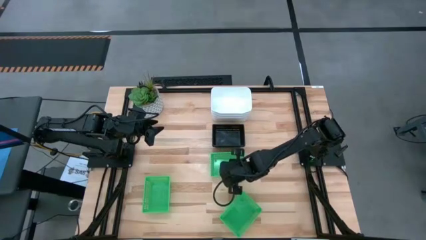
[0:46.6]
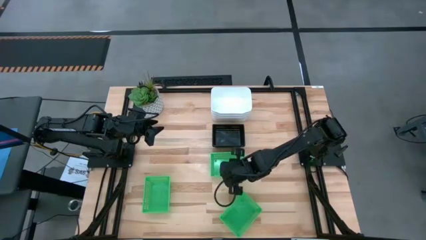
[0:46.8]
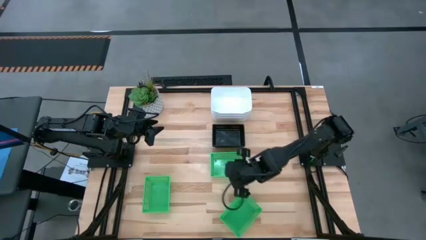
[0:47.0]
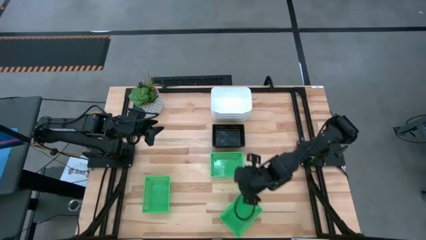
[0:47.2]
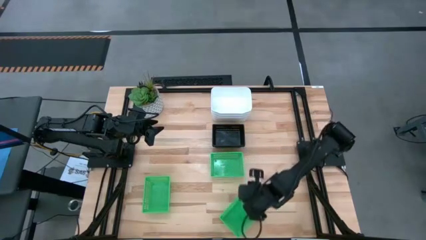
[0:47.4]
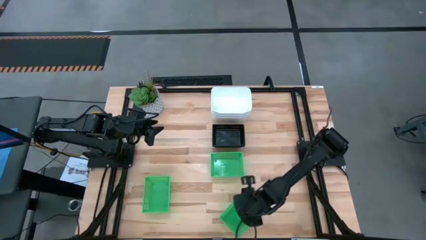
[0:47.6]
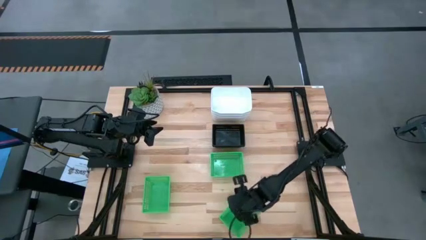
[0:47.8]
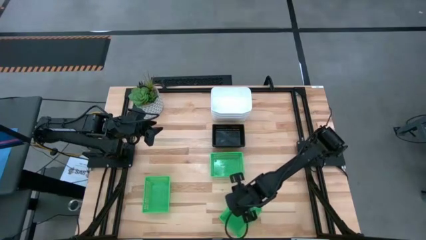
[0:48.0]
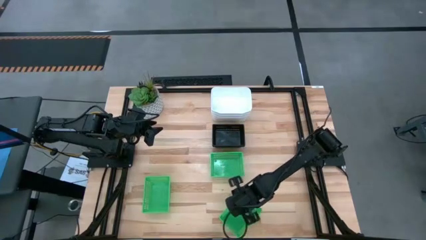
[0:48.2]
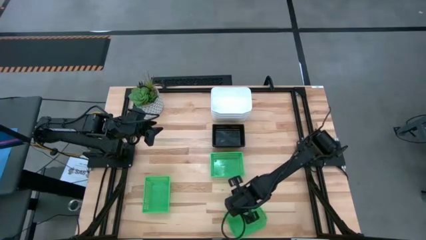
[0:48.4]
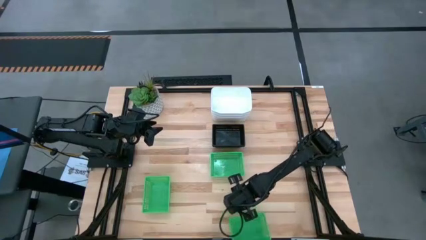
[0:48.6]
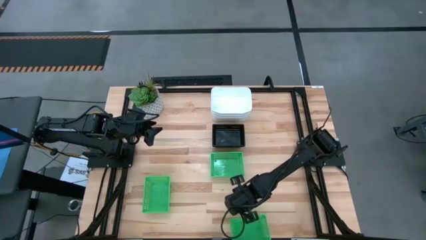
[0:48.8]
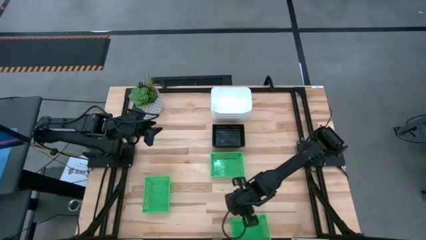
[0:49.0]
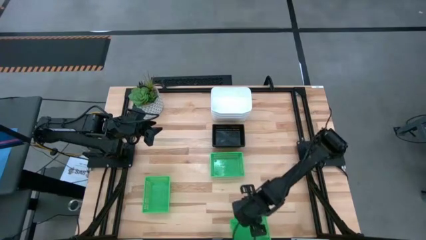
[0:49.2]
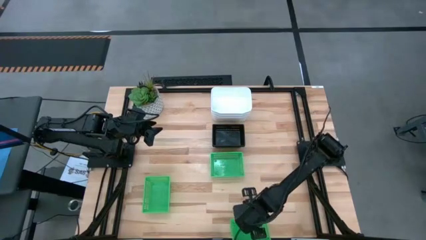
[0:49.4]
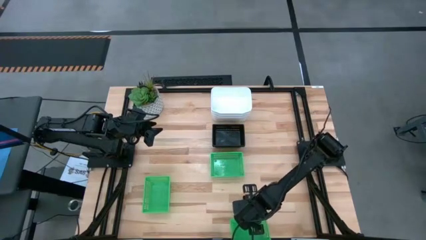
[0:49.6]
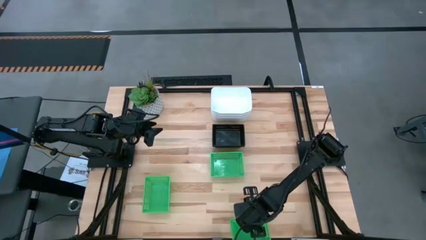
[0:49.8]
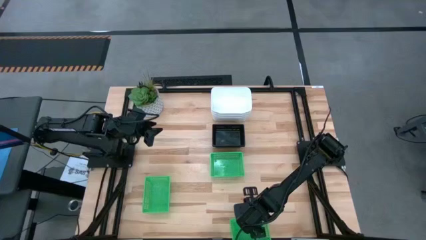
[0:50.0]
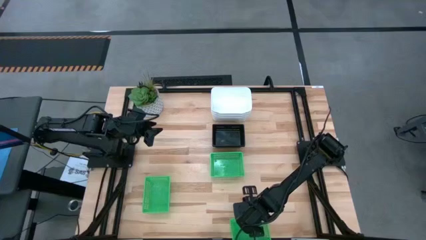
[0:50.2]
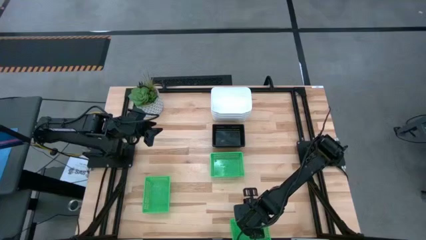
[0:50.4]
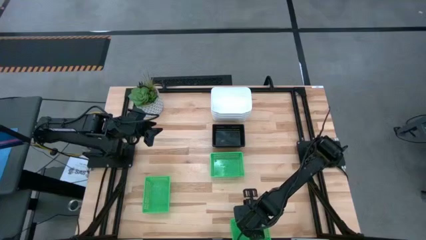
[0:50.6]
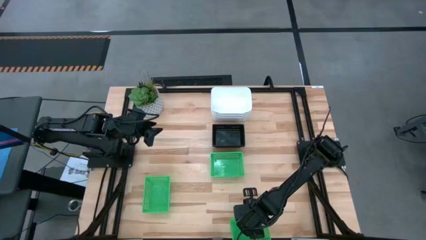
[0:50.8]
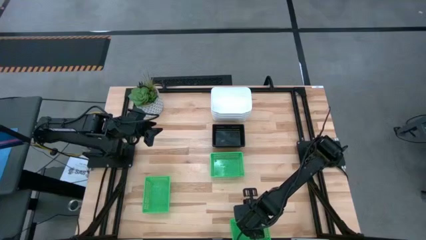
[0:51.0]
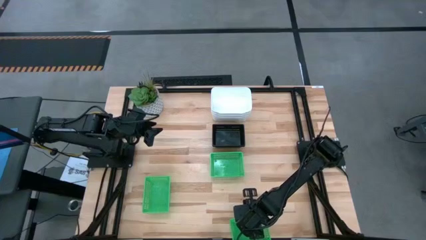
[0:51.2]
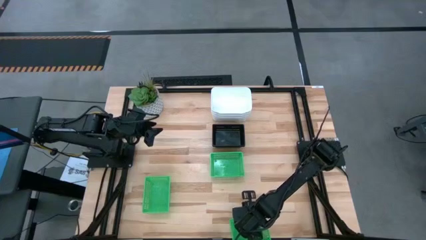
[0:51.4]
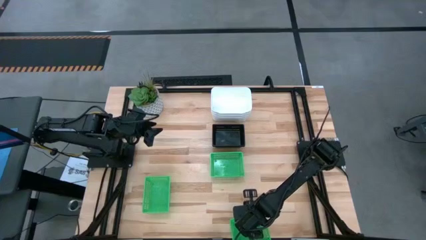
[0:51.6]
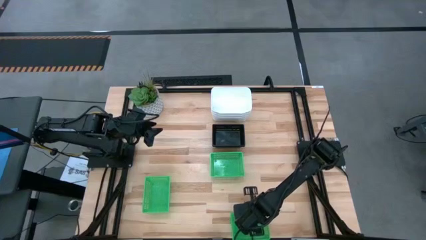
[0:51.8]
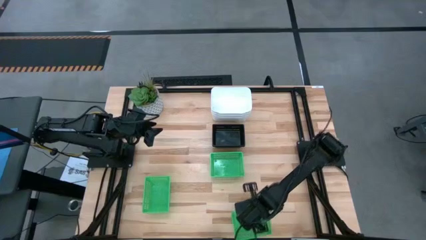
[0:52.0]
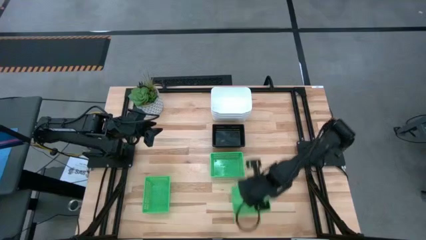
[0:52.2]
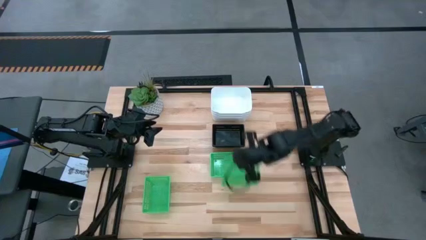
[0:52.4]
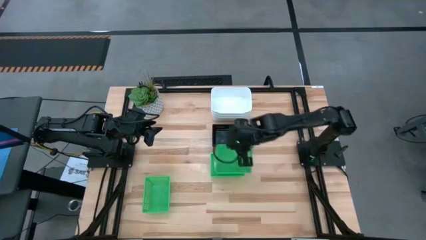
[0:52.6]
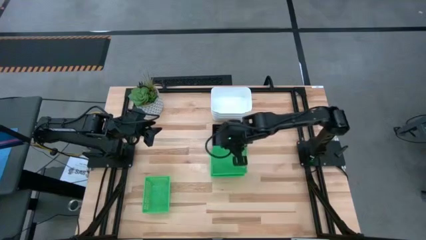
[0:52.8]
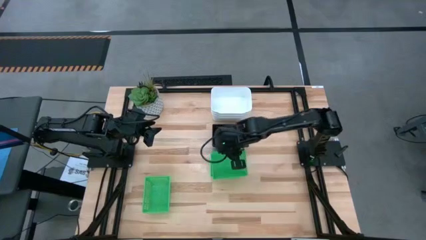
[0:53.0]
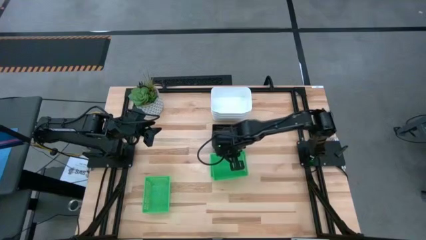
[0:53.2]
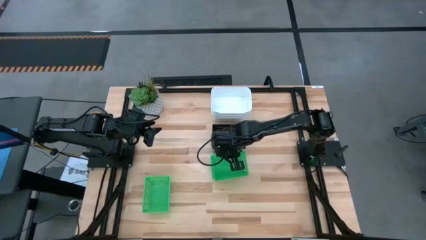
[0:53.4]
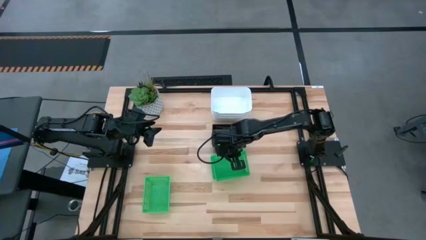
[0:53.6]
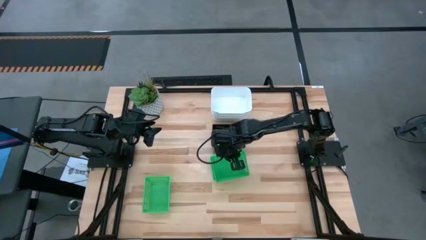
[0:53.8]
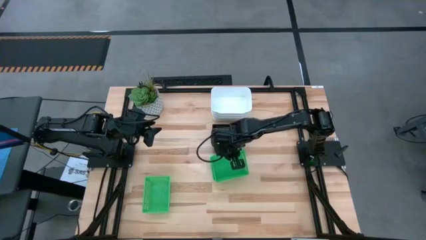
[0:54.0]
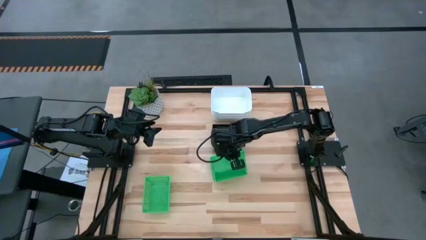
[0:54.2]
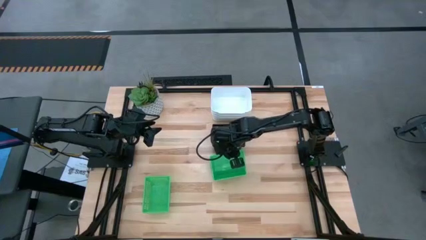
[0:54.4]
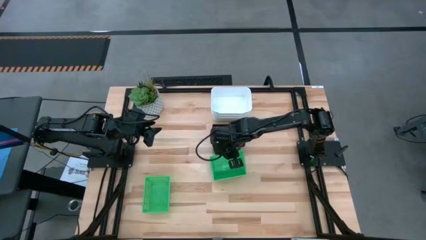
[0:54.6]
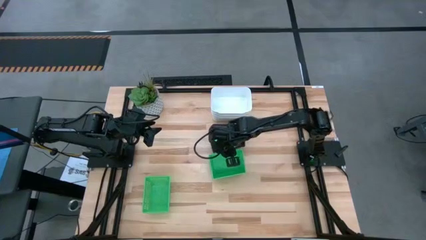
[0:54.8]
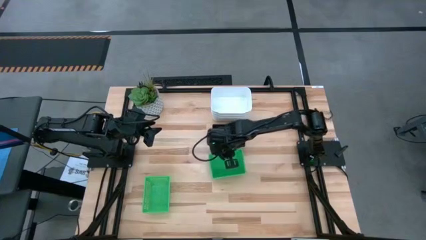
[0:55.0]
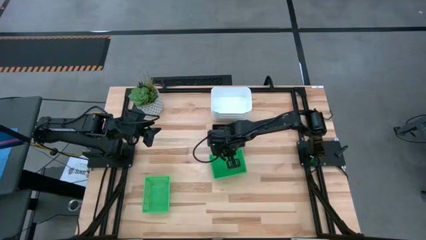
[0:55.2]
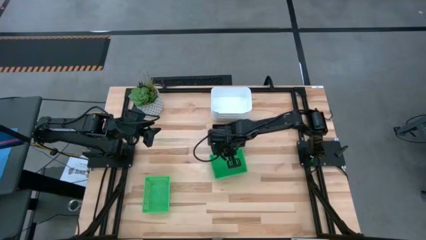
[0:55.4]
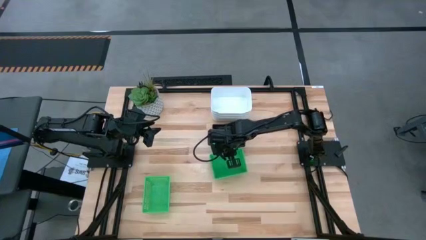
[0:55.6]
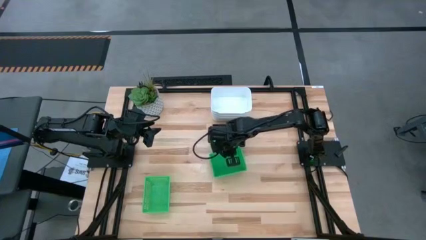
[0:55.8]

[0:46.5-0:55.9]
Stack the bottom green bin on the top green bin

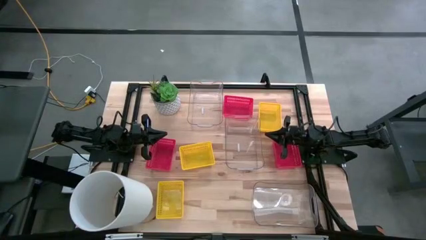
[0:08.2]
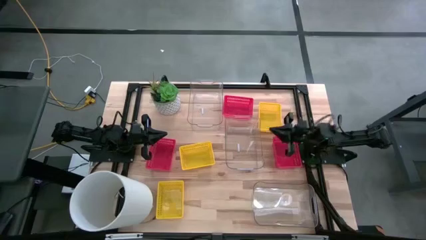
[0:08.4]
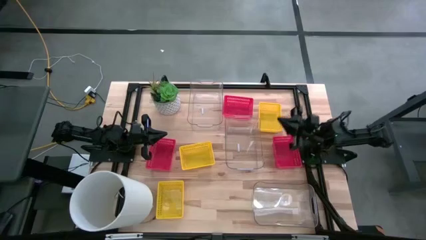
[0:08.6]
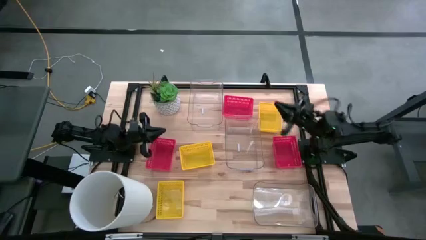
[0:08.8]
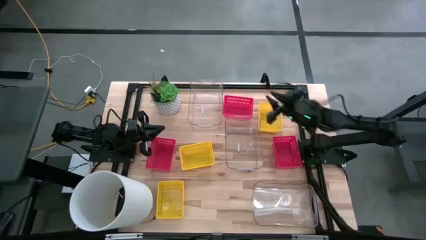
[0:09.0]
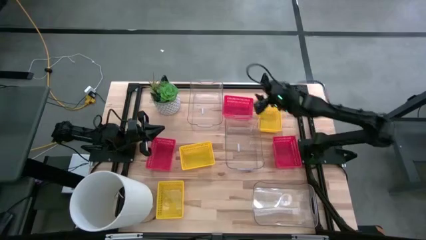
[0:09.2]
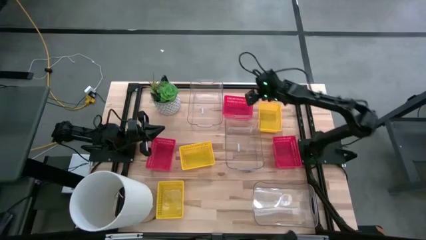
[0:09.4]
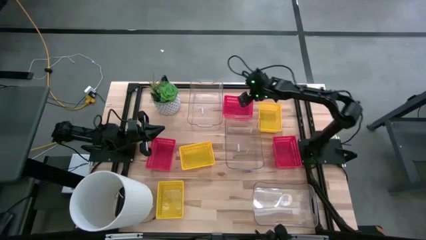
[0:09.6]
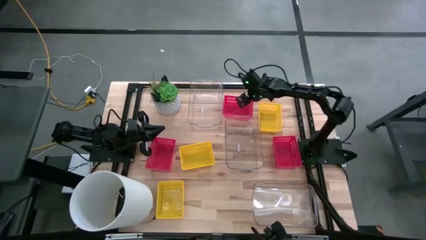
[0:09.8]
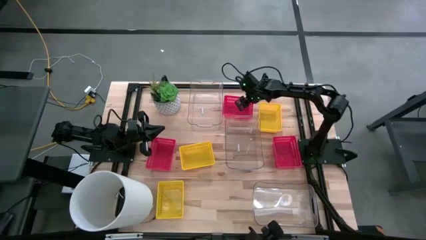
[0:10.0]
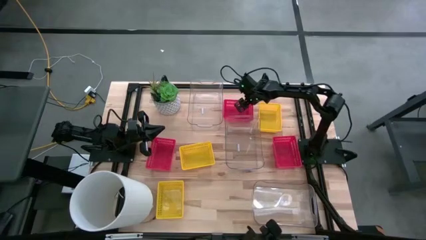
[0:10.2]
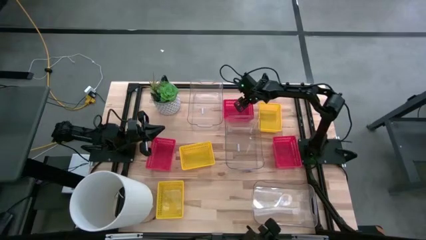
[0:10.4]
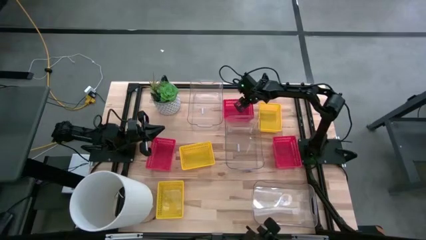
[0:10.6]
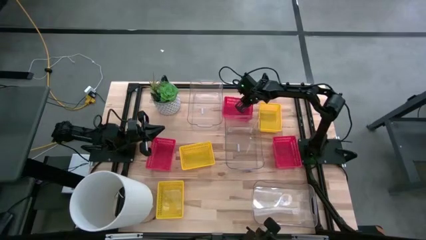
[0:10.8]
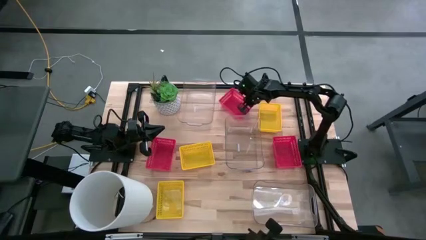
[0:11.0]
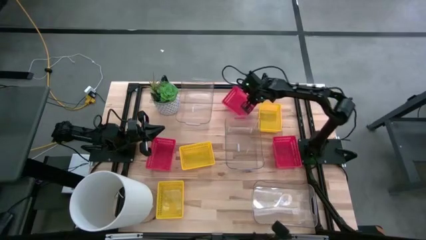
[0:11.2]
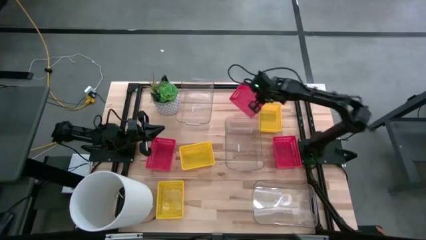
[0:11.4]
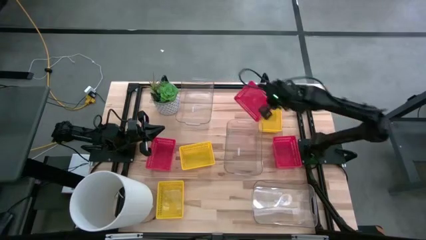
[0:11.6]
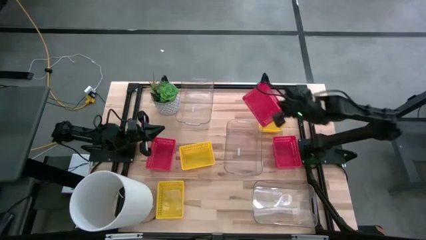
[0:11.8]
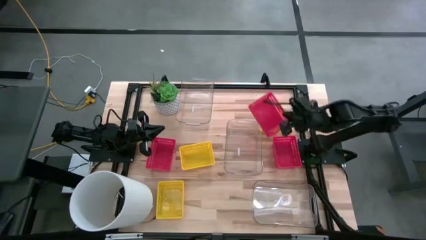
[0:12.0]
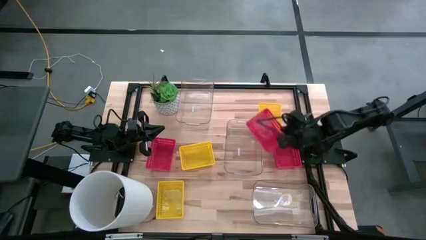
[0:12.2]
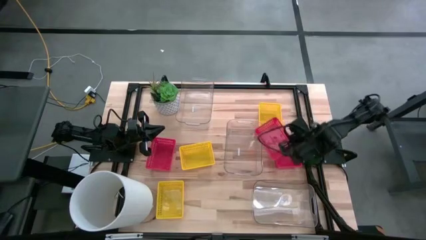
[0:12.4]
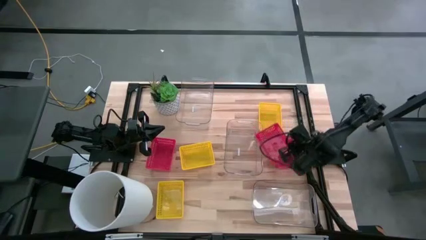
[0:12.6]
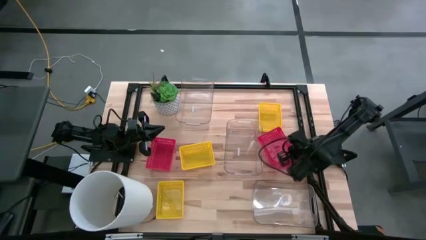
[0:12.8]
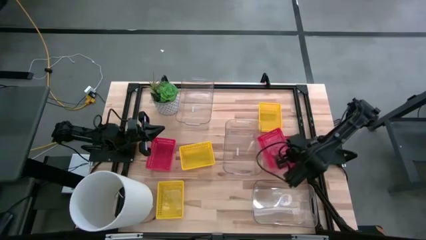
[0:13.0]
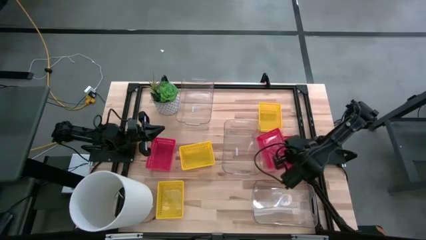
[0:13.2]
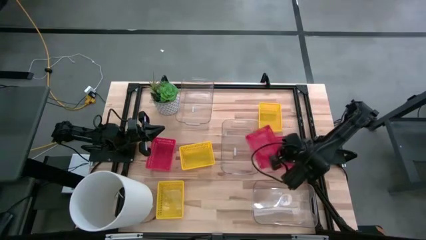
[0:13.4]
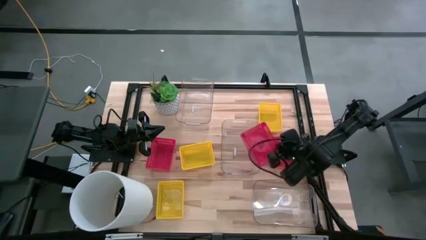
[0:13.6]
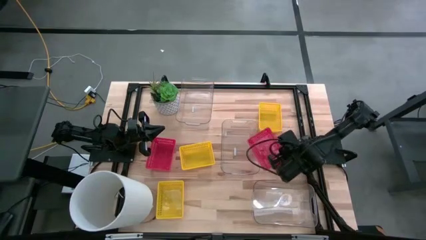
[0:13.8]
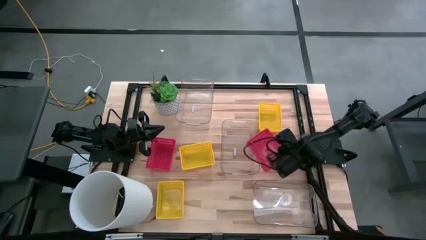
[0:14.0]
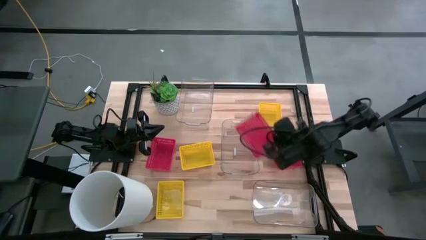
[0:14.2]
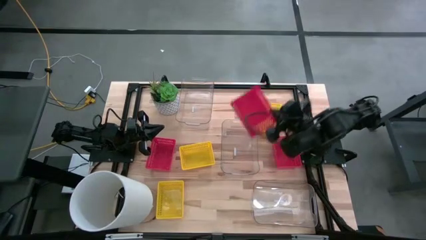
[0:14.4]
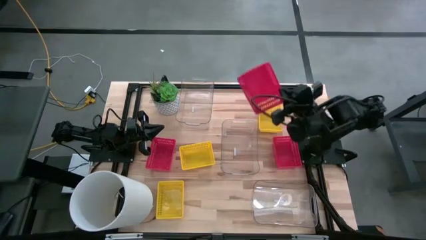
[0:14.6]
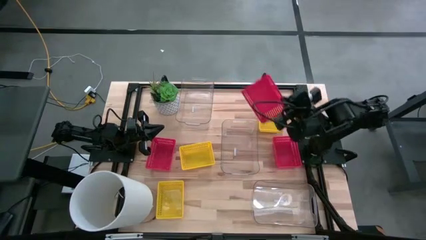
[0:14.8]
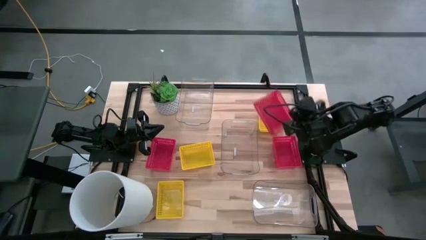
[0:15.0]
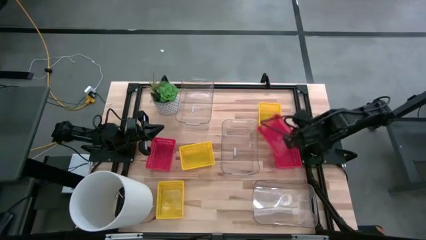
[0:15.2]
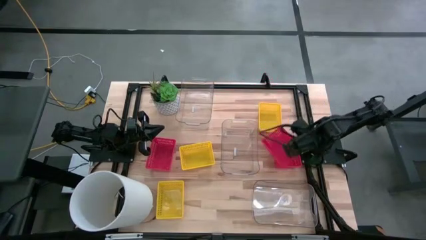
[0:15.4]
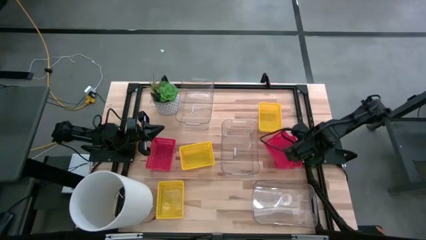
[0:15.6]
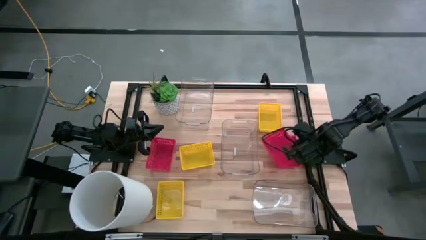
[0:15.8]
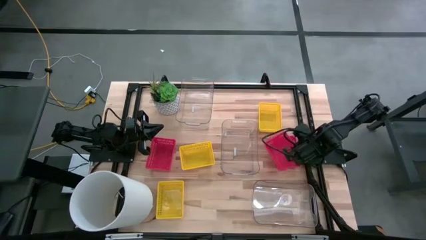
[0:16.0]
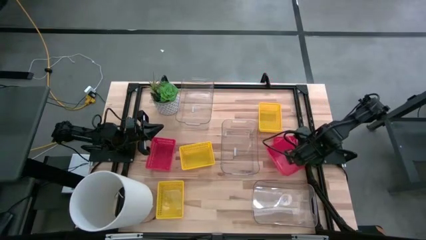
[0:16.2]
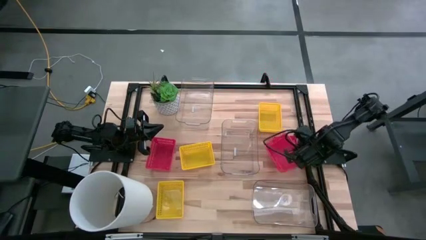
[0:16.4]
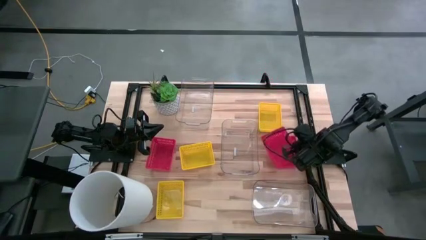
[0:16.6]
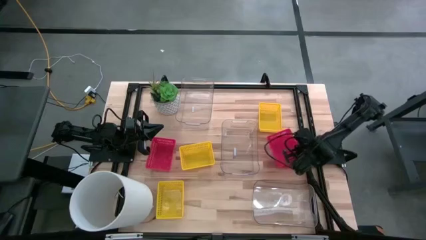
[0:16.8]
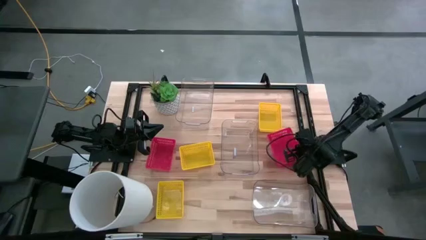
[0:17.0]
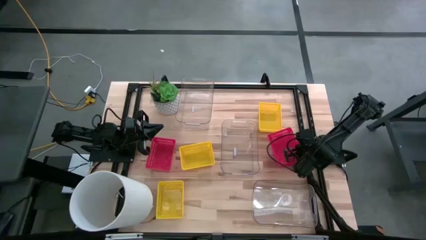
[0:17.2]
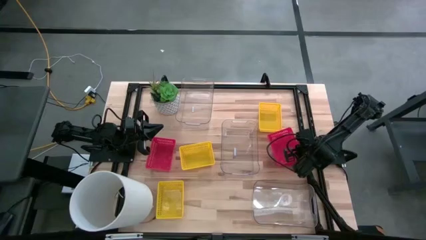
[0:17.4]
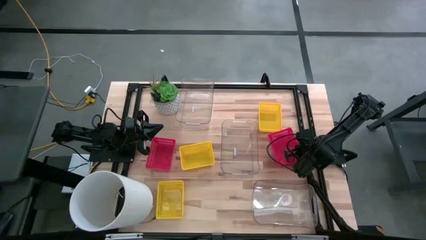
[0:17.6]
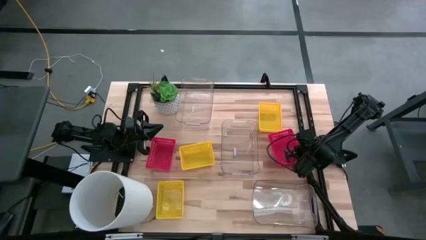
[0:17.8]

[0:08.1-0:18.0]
Stack the top red bin on the bottom right red bin
